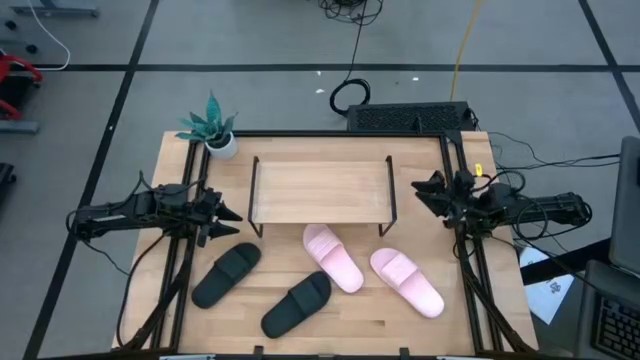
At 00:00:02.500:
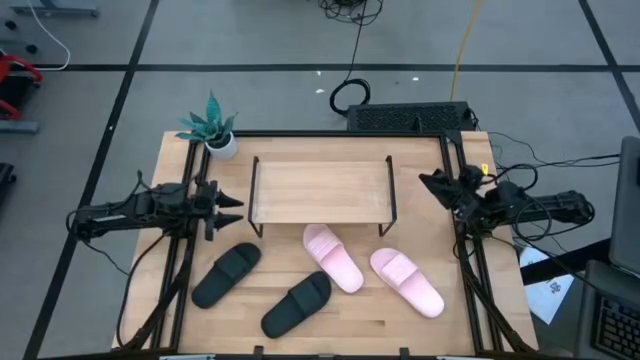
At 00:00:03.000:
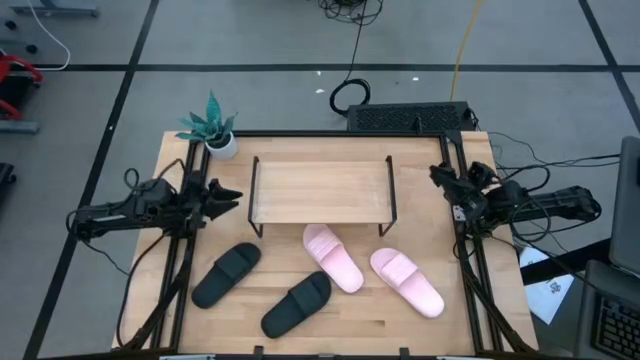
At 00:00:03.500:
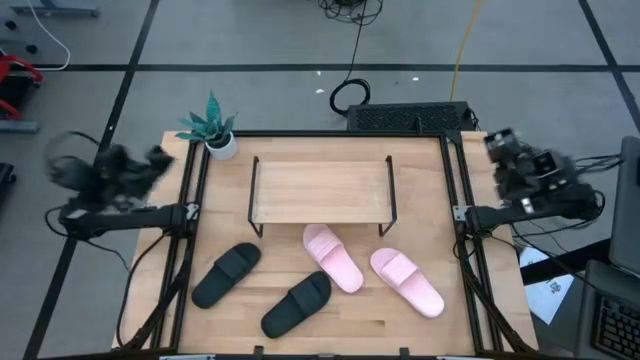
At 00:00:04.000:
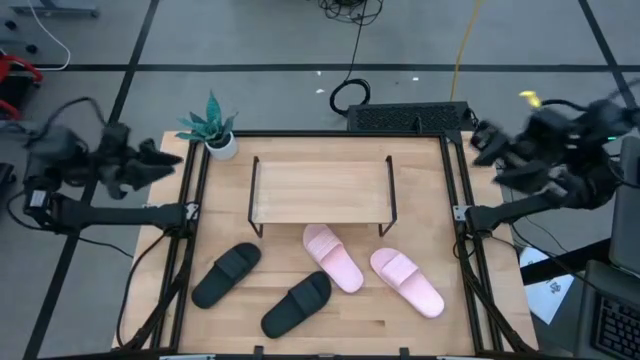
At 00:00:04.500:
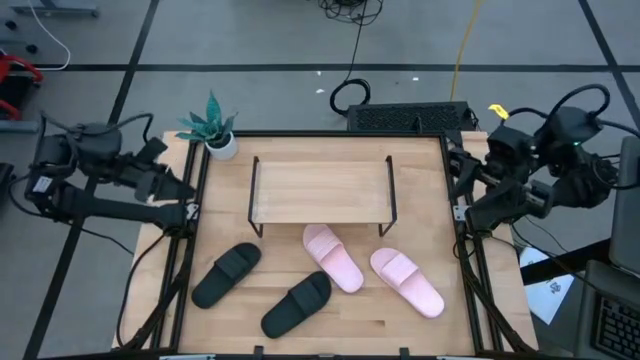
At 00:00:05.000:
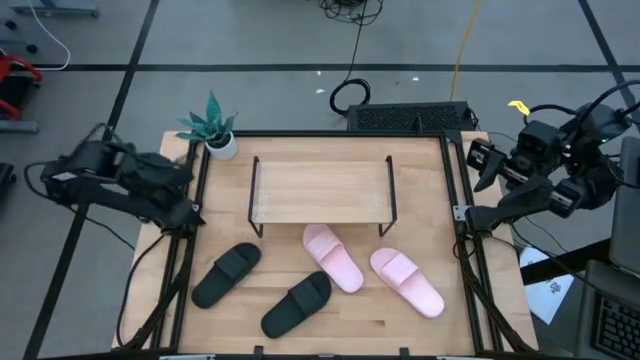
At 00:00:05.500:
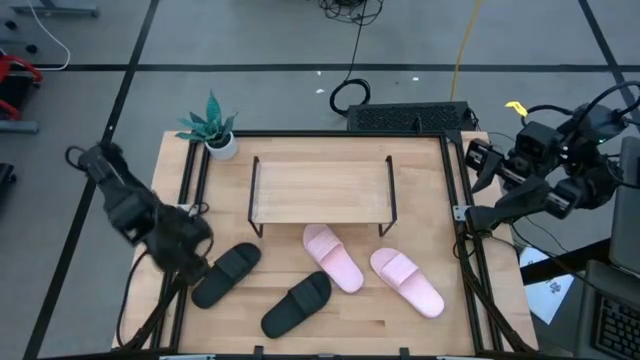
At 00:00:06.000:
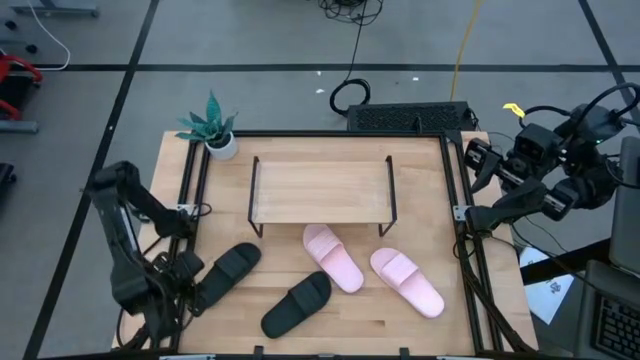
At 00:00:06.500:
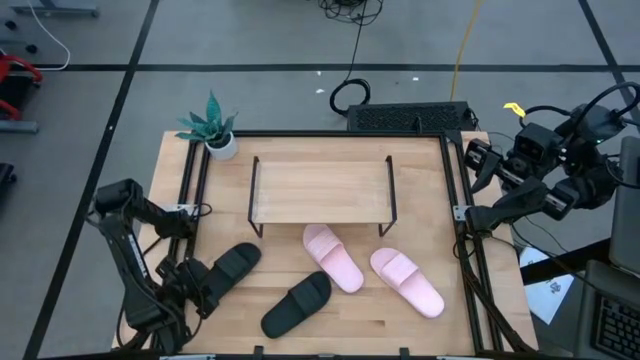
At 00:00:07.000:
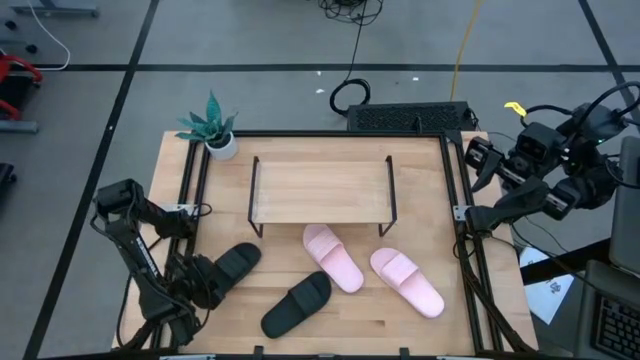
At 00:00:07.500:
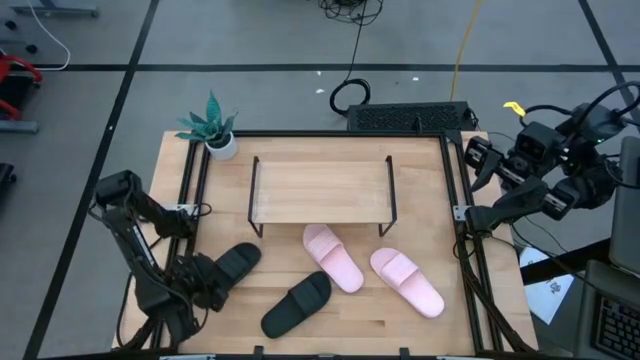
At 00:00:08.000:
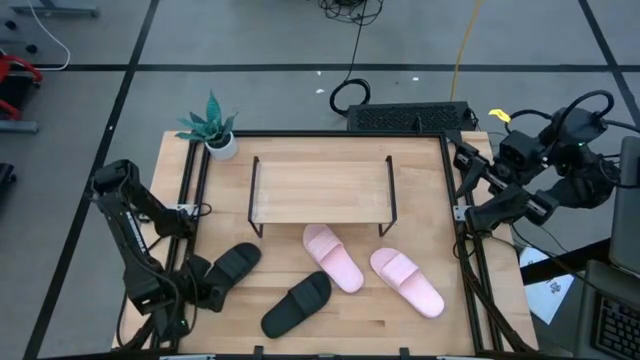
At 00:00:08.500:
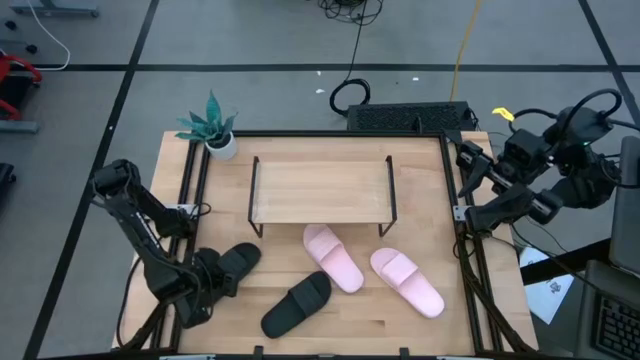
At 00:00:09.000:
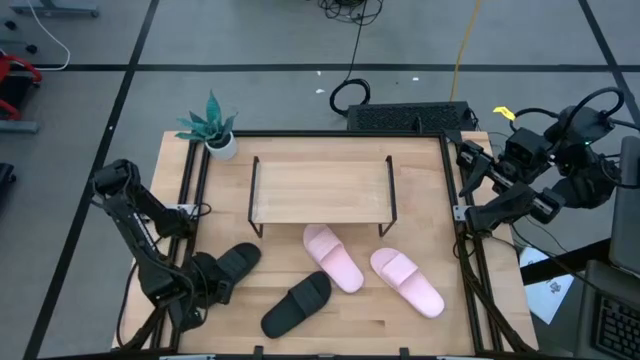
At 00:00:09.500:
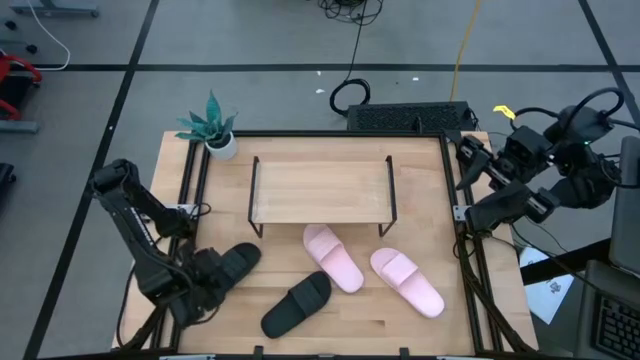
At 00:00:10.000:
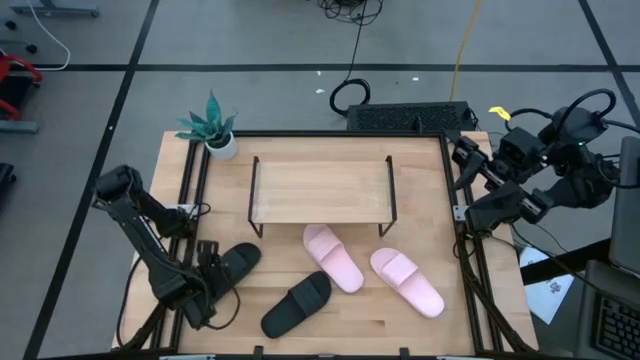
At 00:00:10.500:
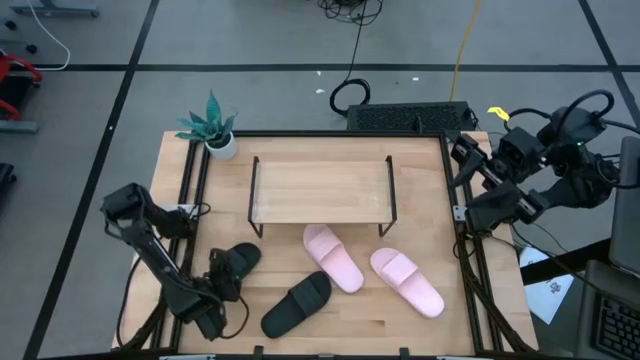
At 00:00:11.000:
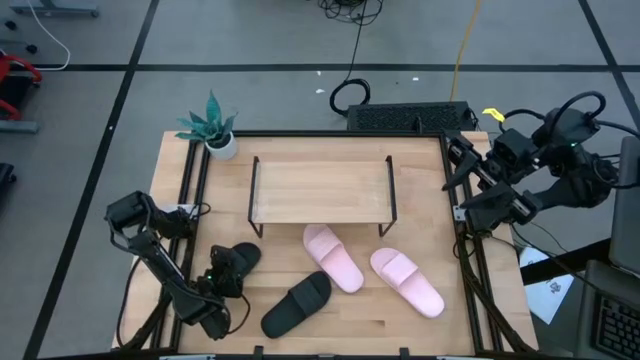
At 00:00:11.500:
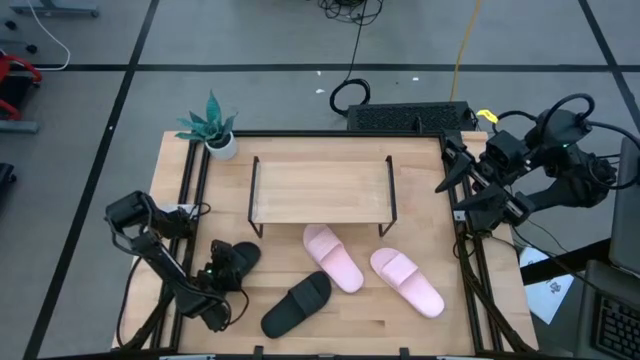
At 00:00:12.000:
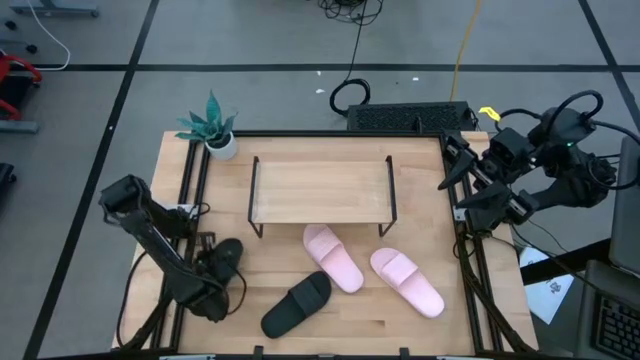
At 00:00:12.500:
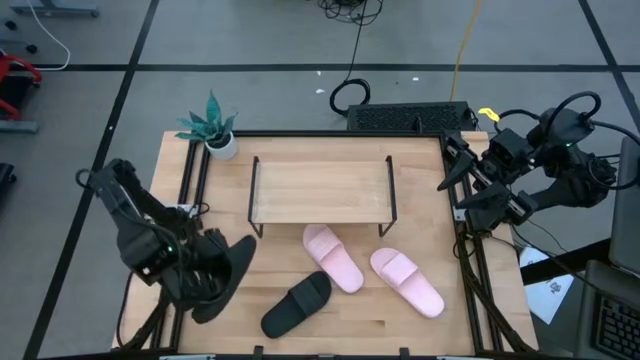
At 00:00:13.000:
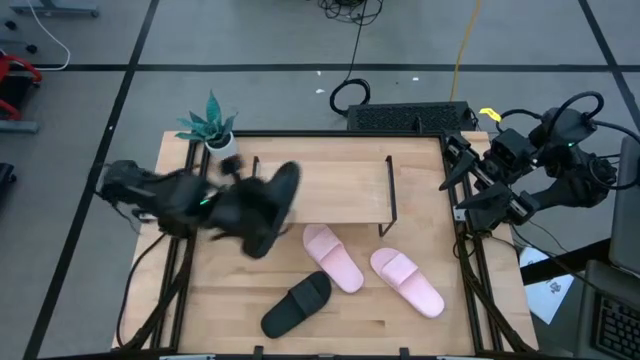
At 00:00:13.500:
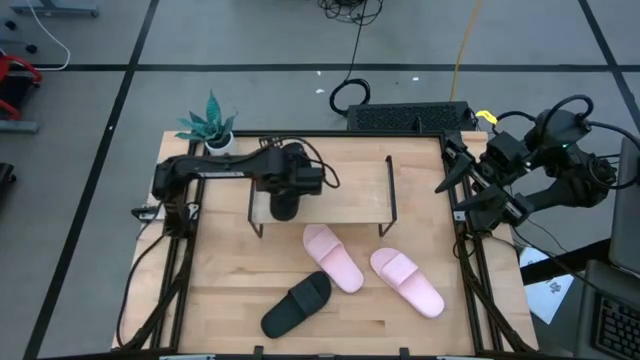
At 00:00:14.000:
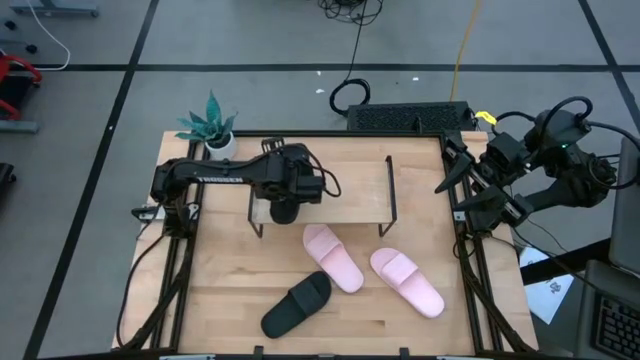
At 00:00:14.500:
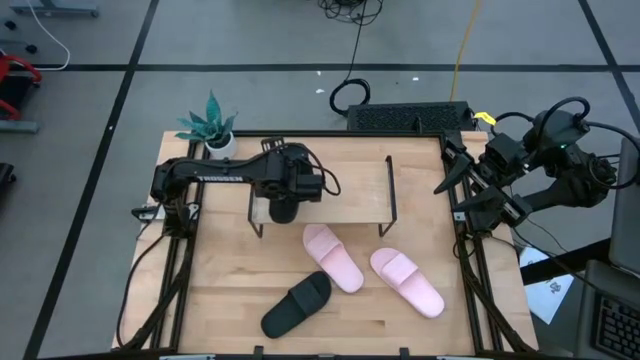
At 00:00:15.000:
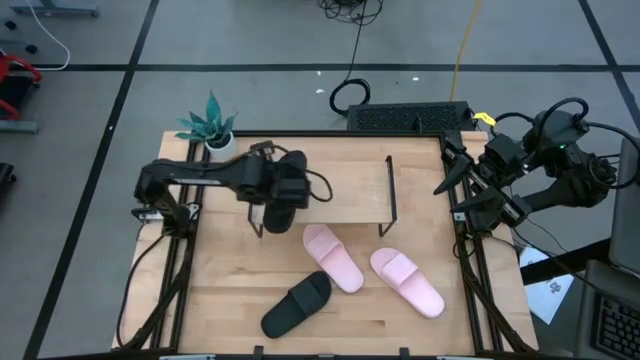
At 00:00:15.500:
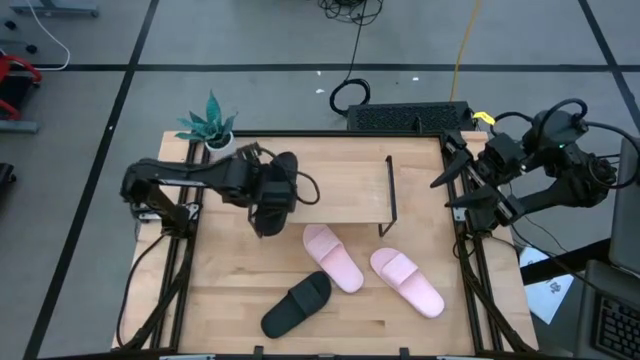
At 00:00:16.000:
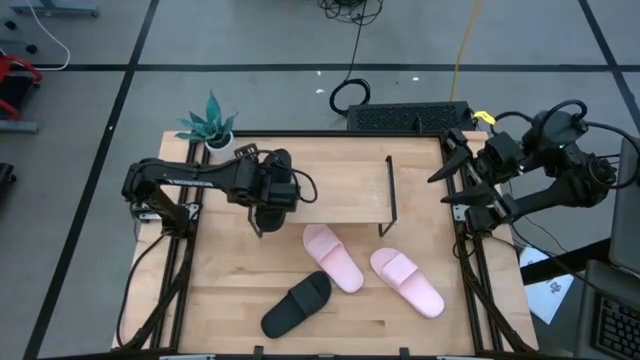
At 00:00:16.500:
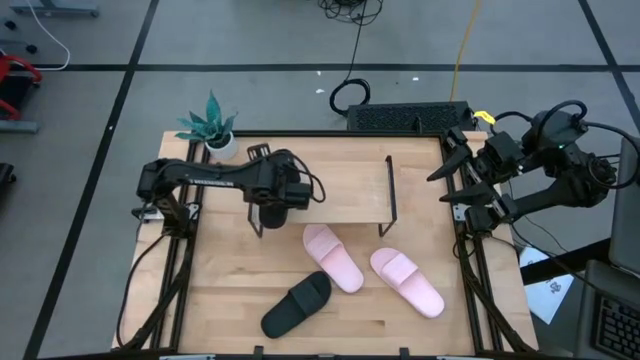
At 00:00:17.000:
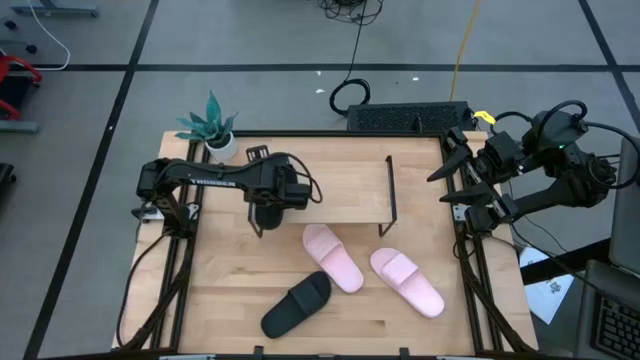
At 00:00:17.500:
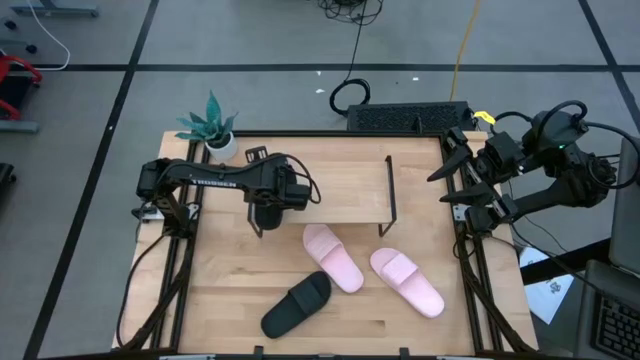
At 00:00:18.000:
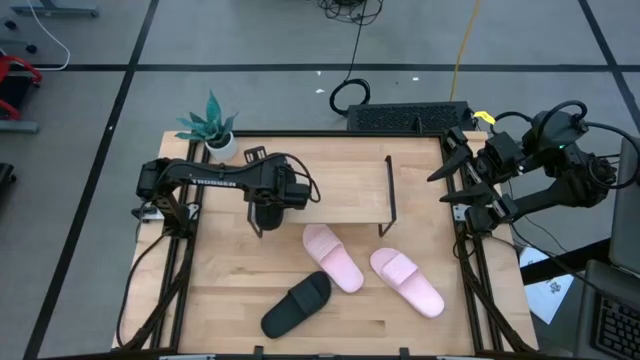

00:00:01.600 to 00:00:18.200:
Task: Pick and place slides into the shelf
Put the left black slipper on the shelf
